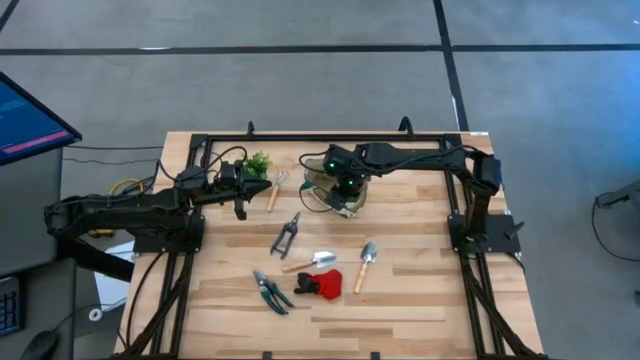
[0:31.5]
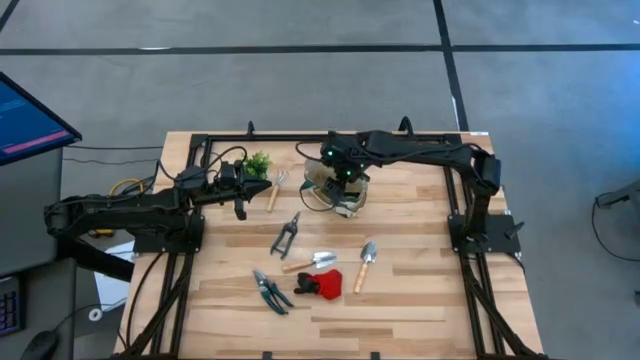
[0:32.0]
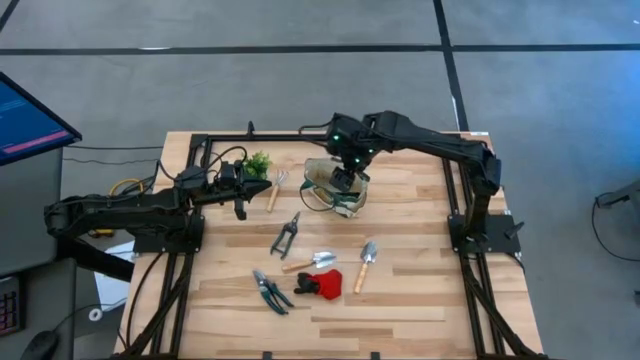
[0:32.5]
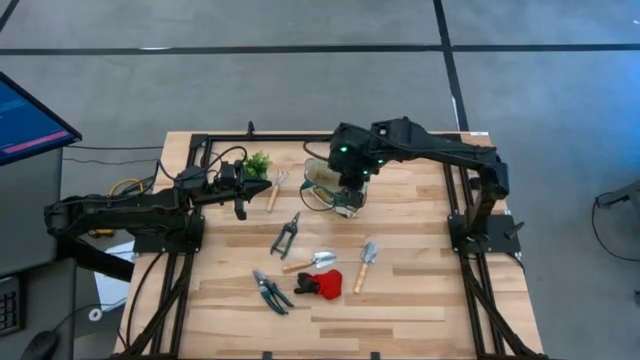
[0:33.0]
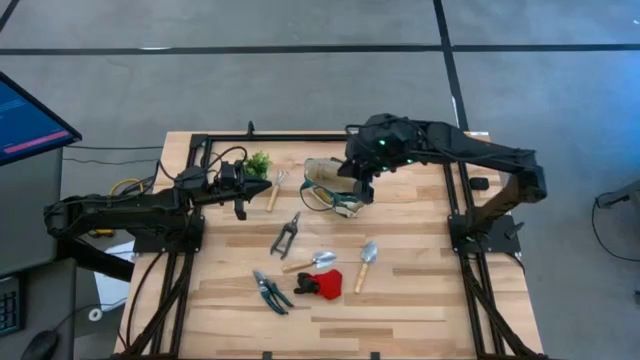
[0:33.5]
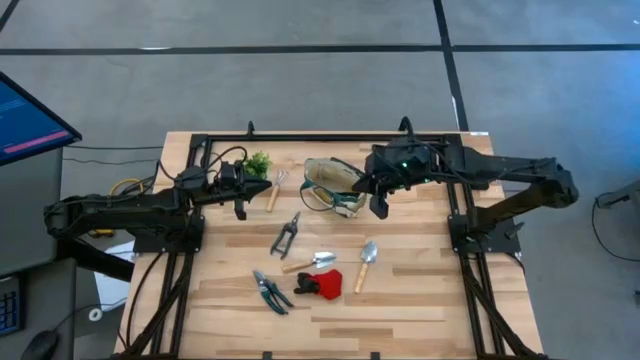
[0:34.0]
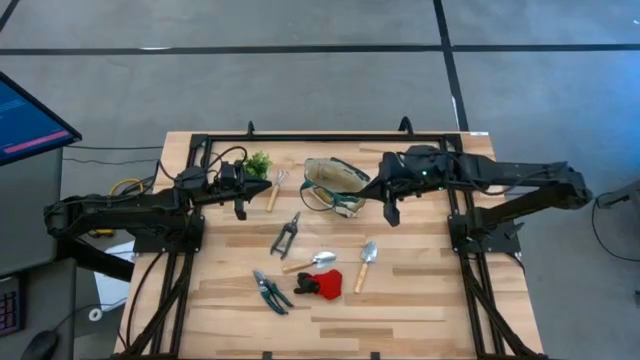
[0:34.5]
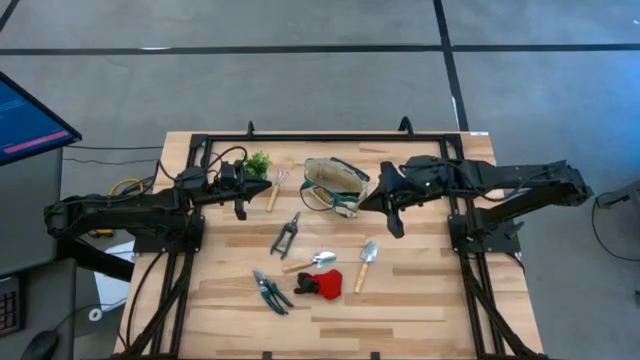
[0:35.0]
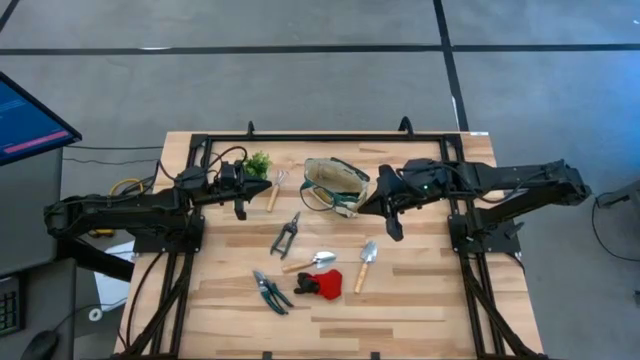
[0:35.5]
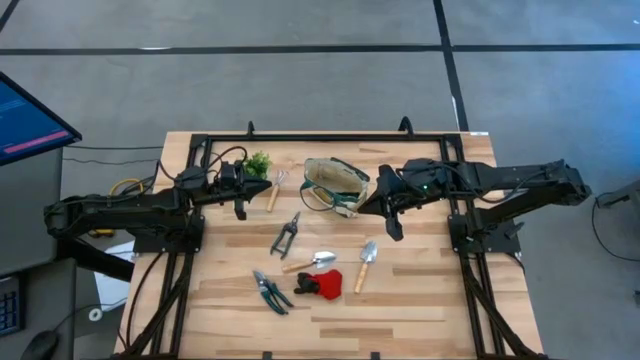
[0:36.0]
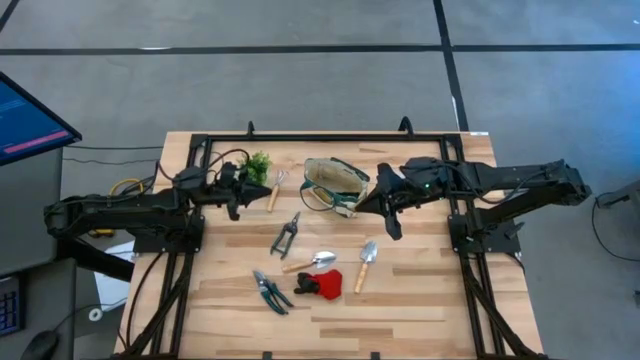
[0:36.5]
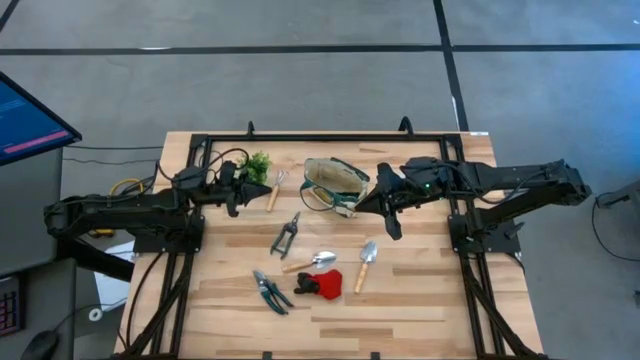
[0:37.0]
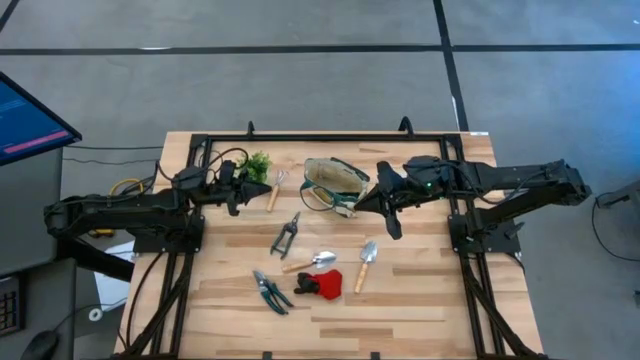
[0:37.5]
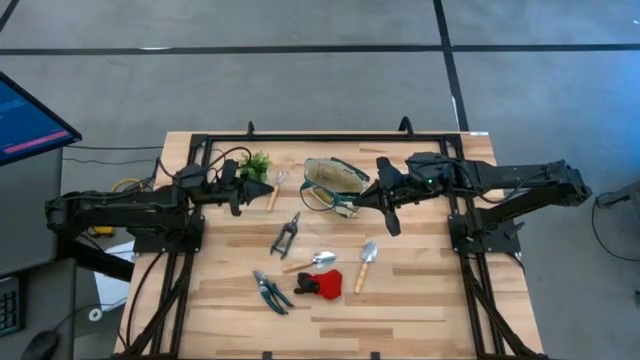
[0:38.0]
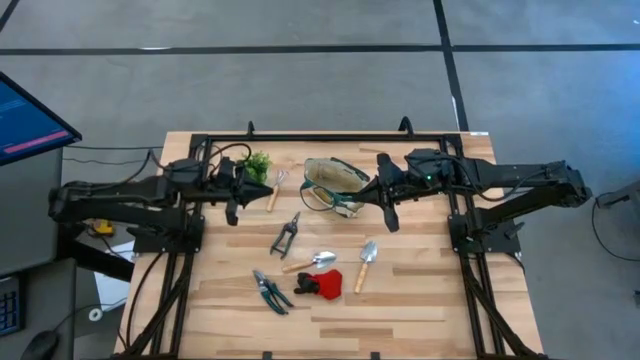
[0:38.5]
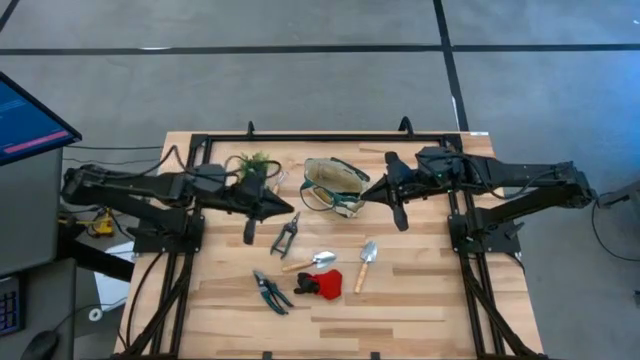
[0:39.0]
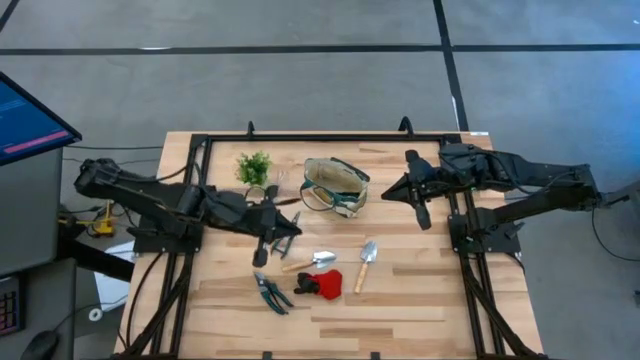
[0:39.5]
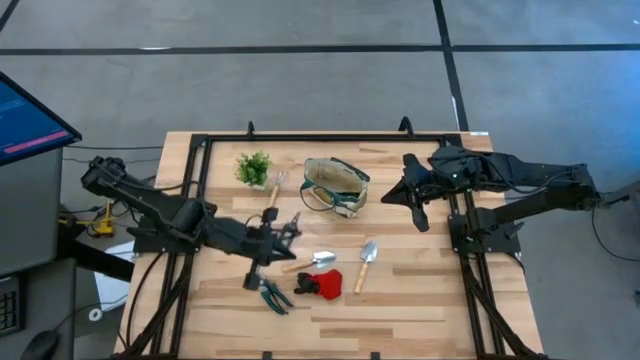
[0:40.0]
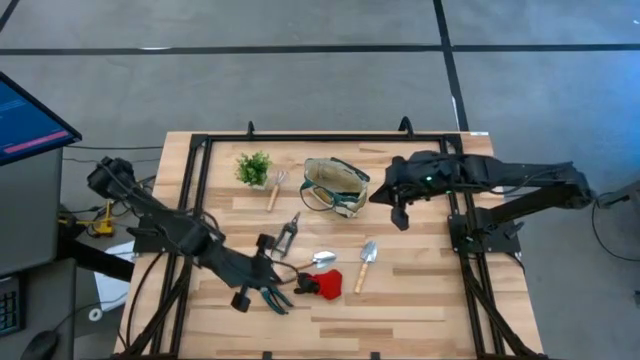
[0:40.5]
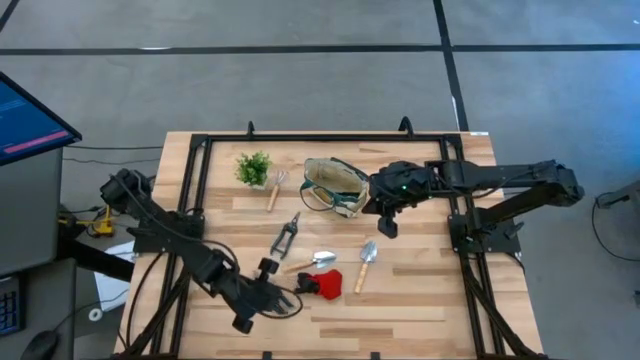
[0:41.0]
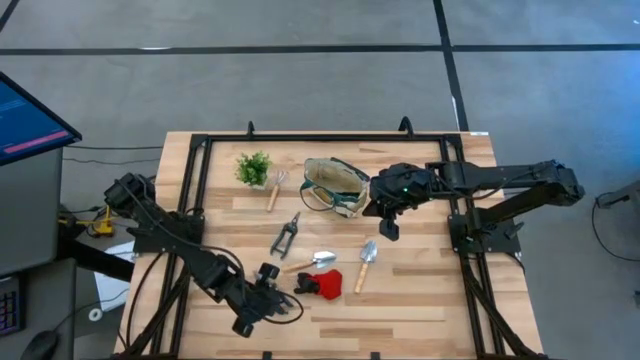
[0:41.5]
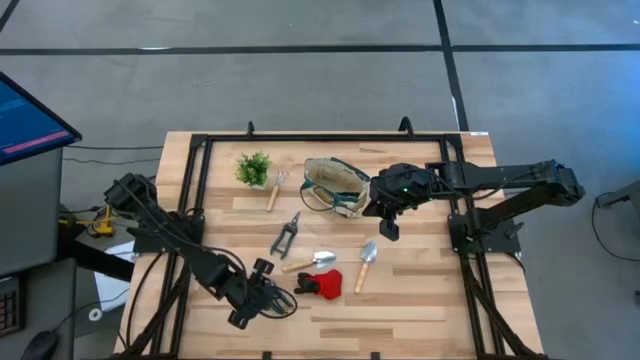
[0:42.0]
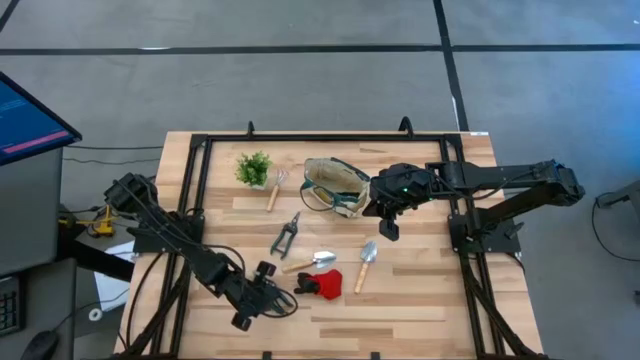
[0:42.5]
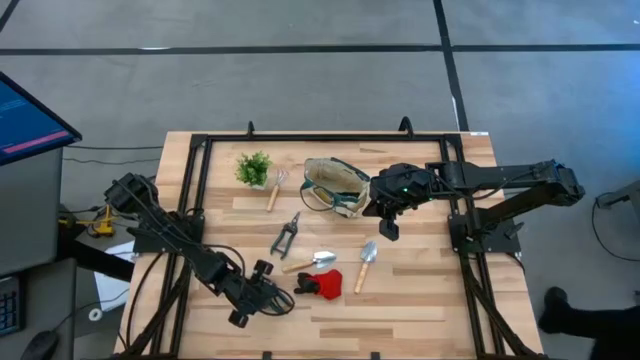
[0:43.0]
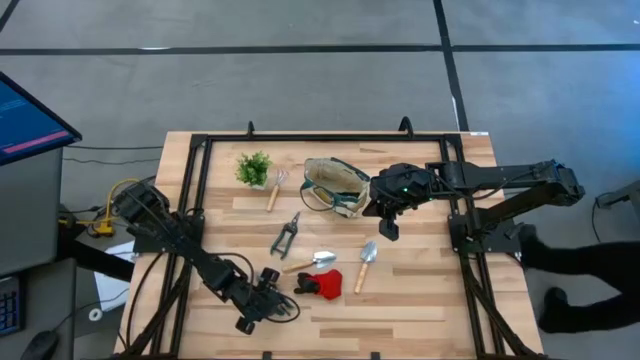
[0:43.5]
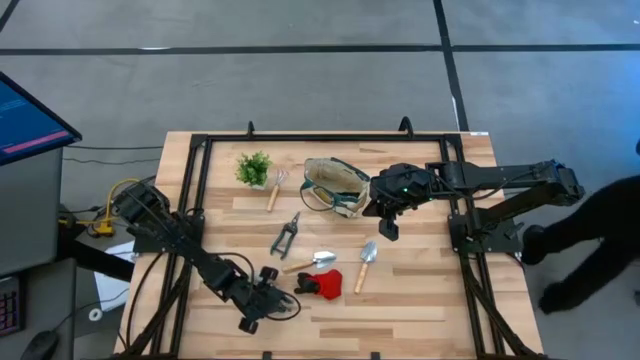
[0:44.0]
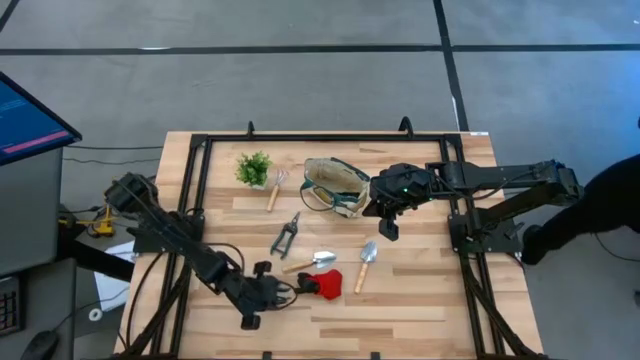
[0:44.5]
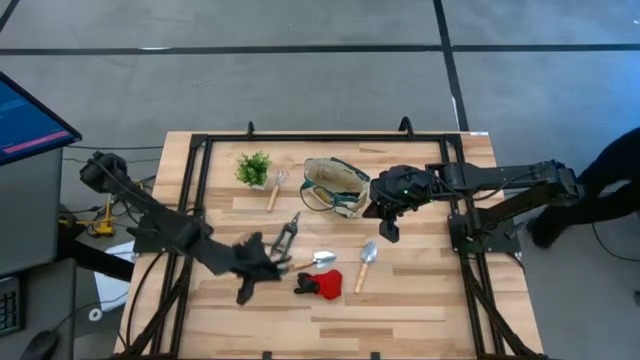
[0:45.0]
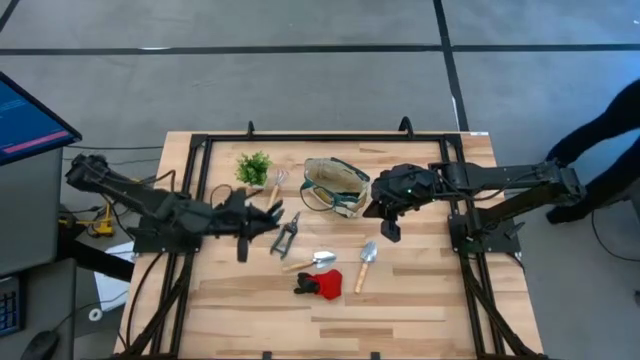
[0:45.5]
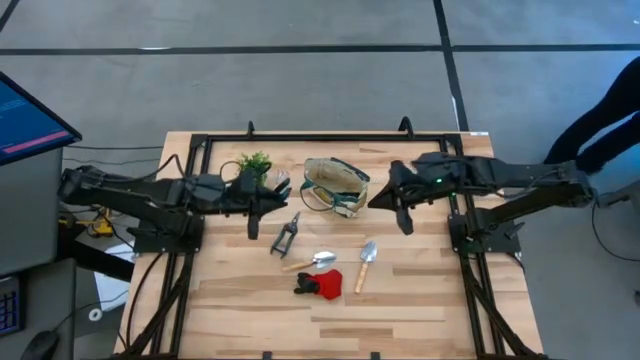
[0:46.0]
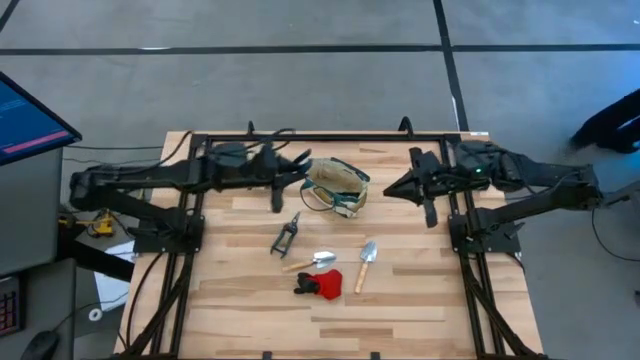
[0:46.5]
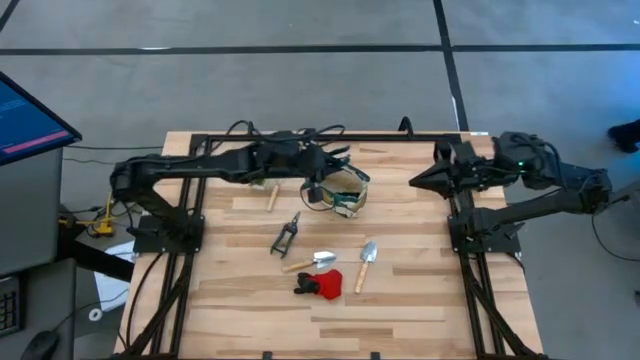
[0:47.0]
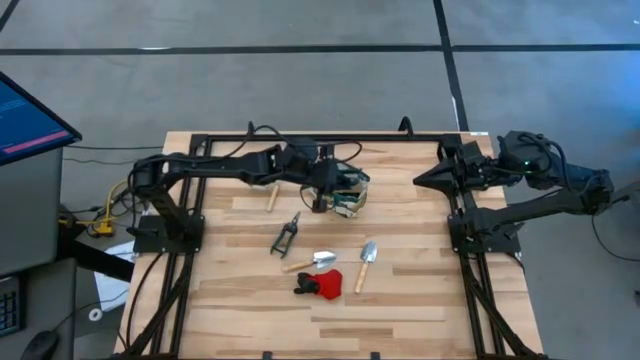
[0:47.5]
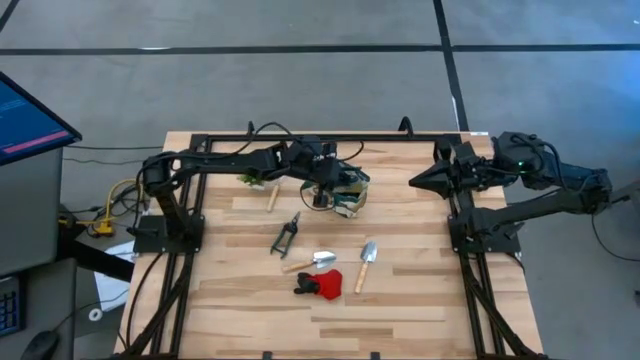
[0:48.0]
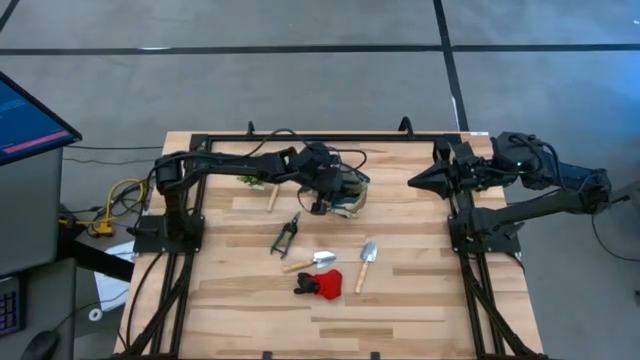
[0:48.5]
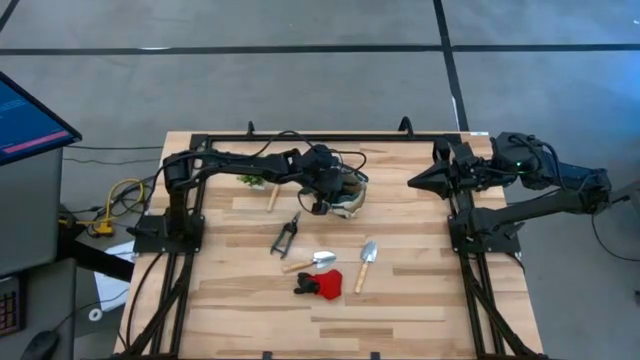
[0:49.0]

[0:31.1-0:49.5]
Task: Pick & Place Garden tools in Gardening bag
Put the bottom shear scissor into the gardening bag

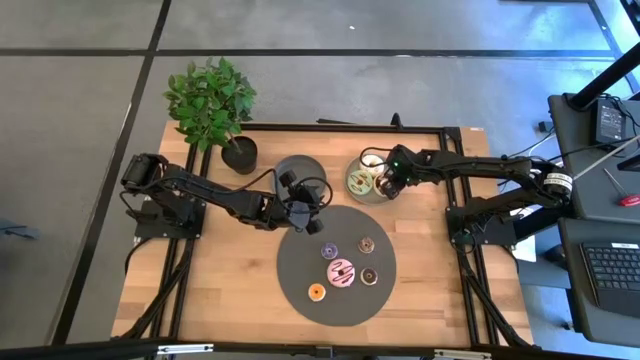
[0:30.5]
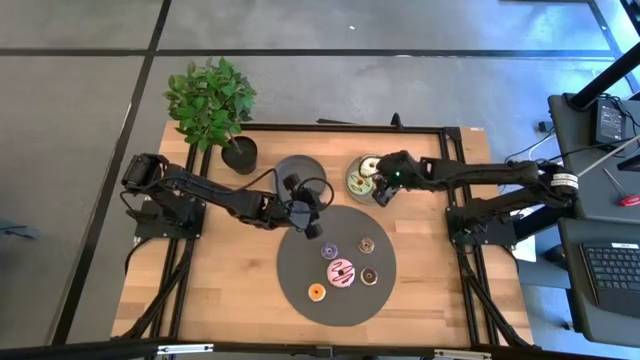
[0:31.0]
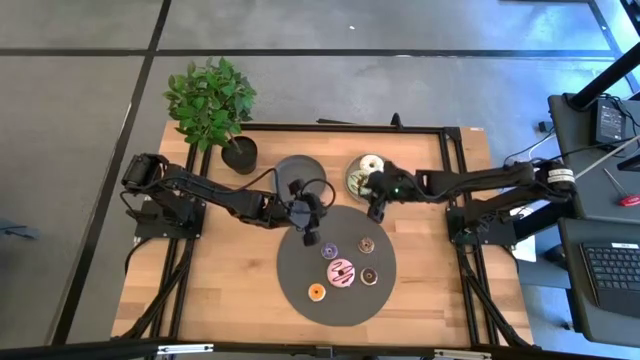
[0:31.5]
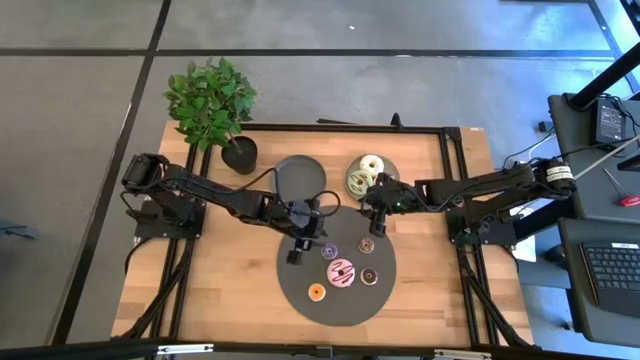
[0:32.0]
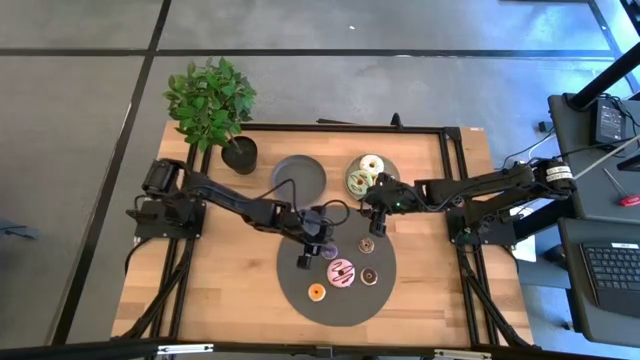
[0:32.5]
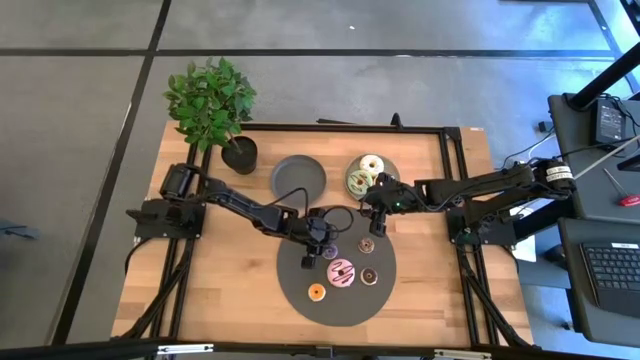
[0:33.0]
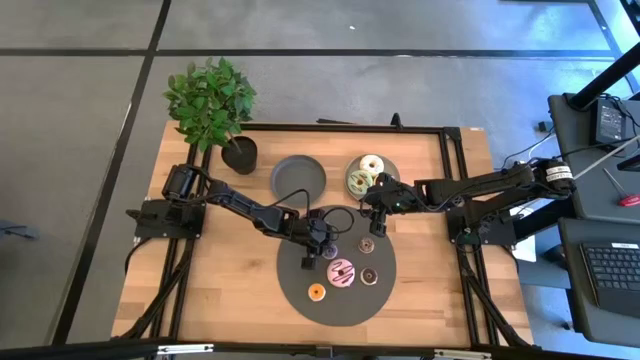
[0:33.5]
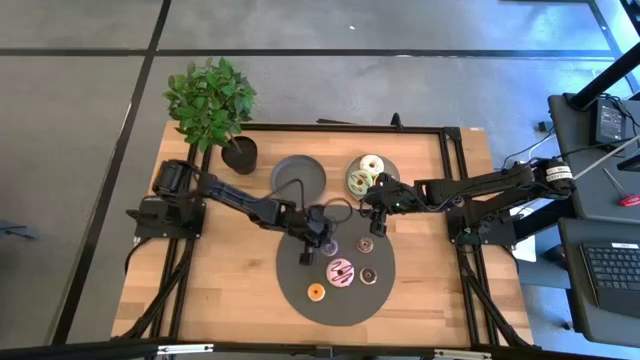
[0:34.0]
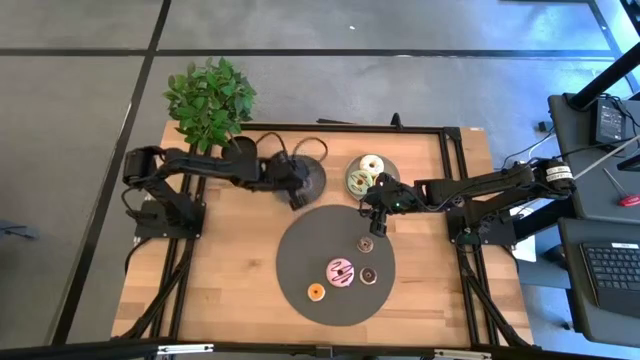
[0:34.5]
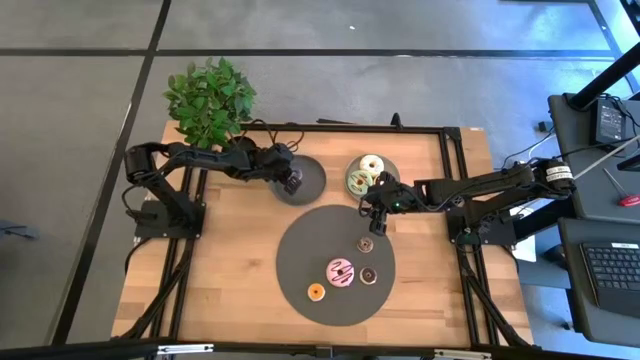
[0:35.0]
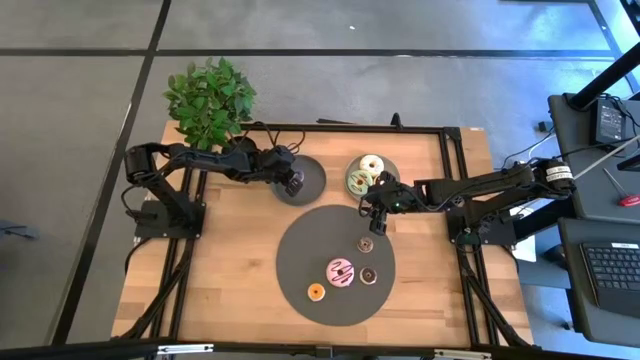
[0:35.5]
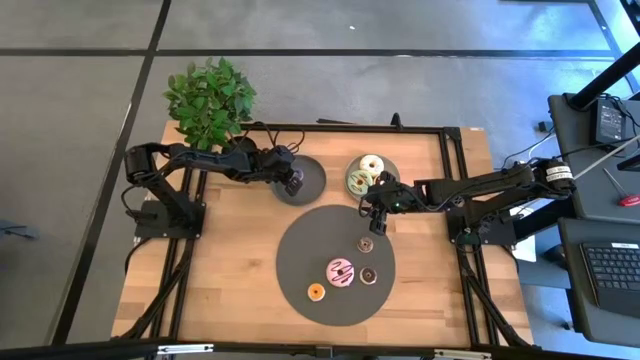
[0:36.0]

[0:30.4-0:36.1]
Task: Pick & Place donuts
Put the small blue donut on the dark gray plate
